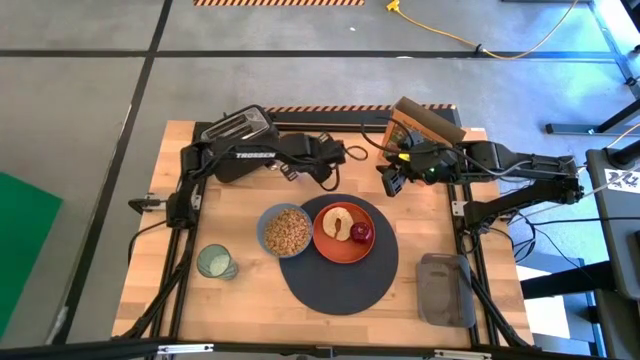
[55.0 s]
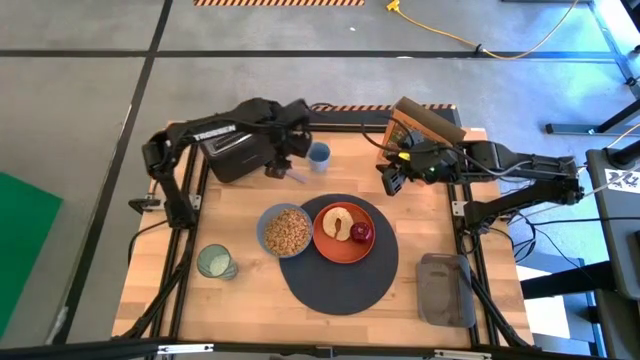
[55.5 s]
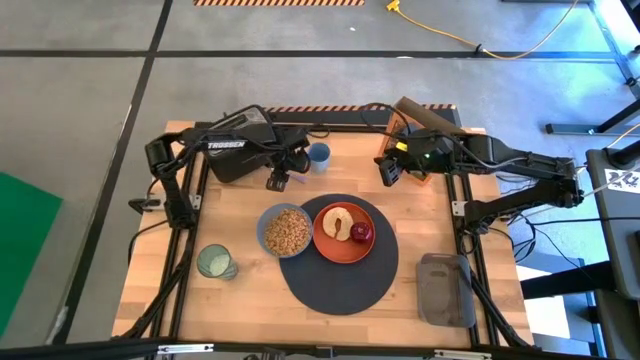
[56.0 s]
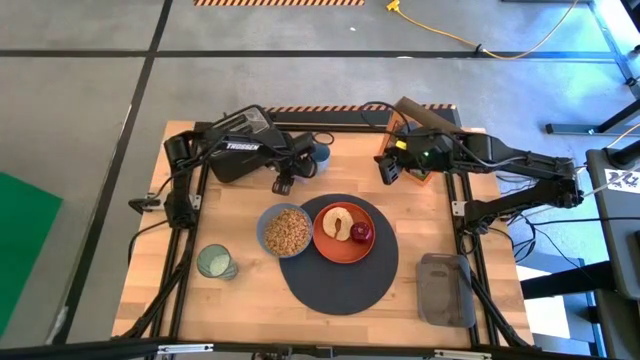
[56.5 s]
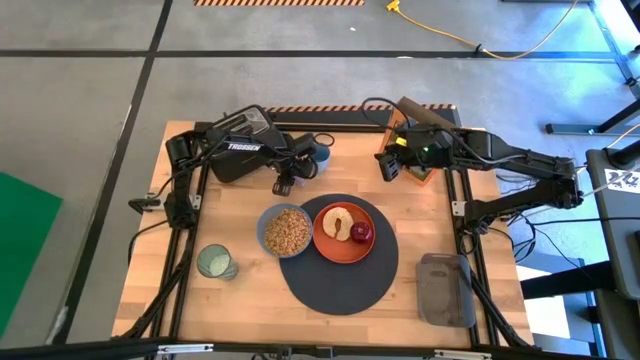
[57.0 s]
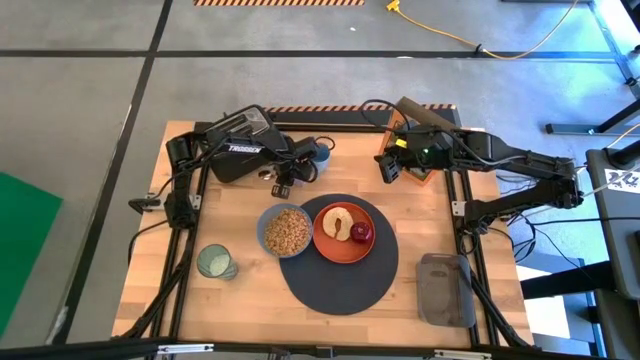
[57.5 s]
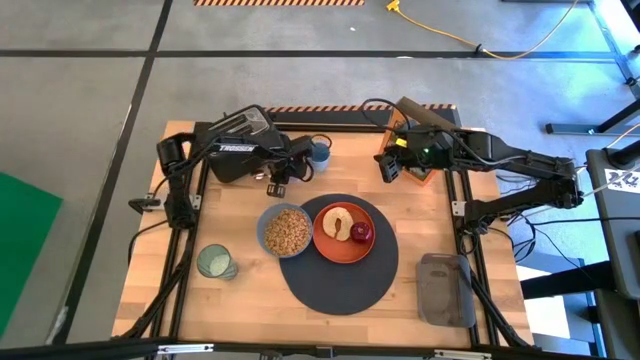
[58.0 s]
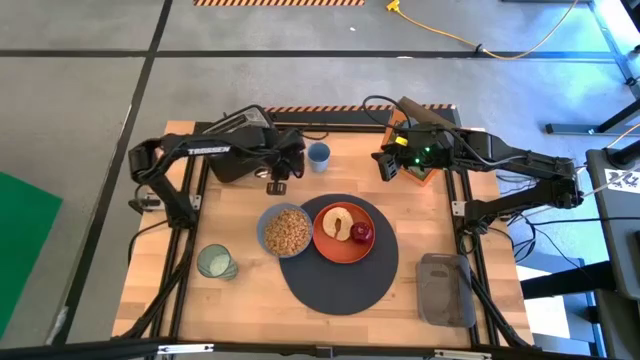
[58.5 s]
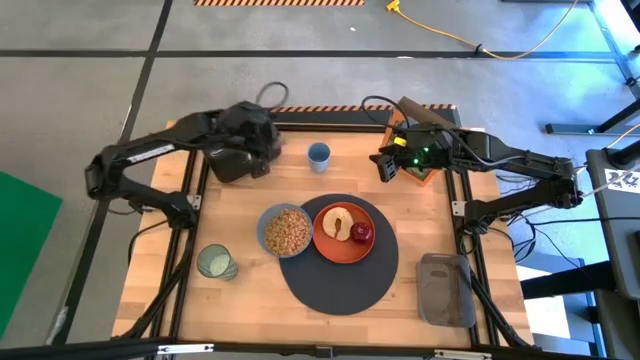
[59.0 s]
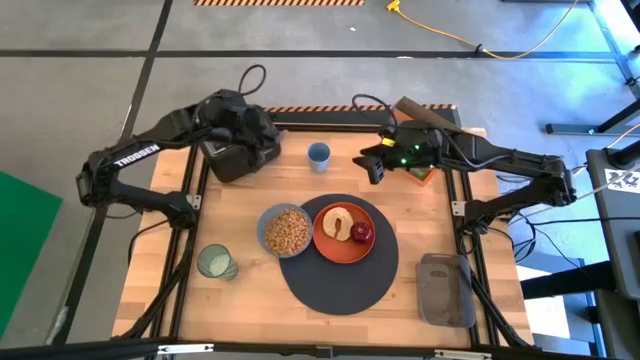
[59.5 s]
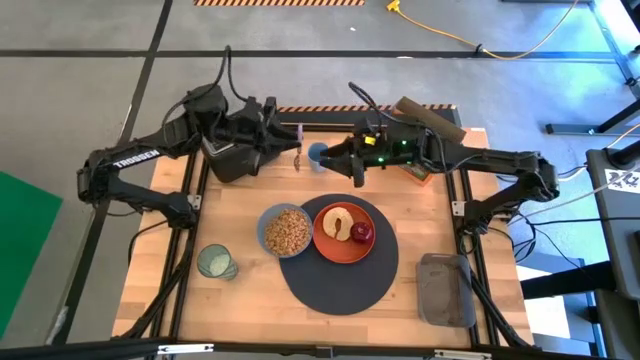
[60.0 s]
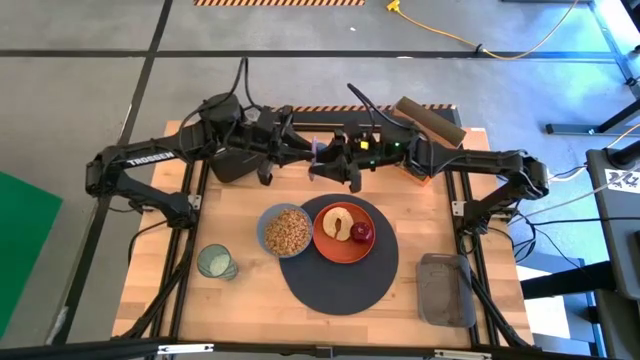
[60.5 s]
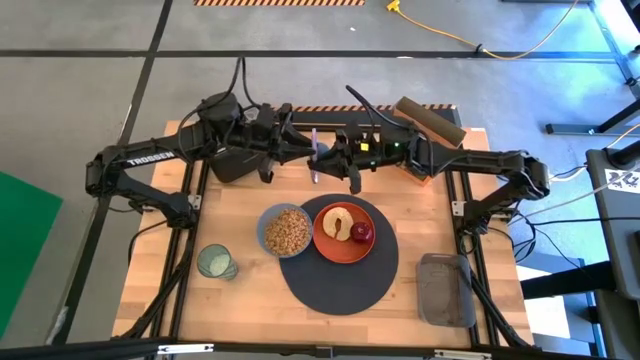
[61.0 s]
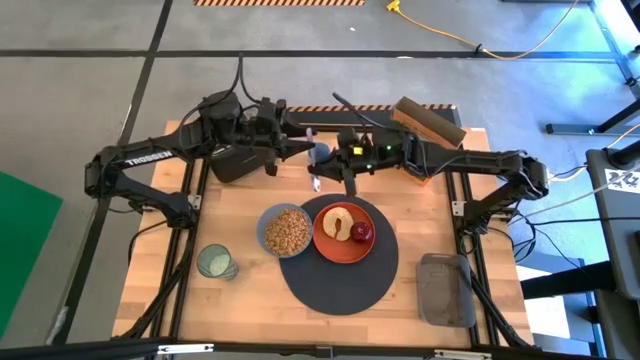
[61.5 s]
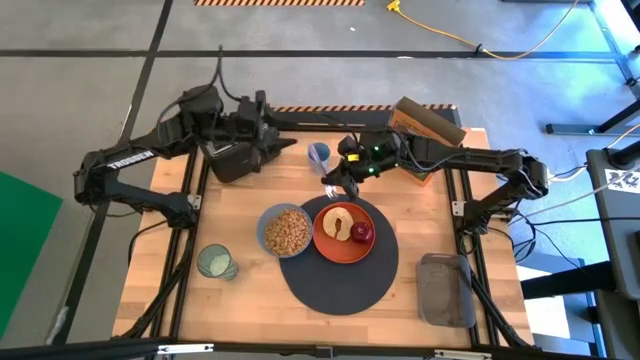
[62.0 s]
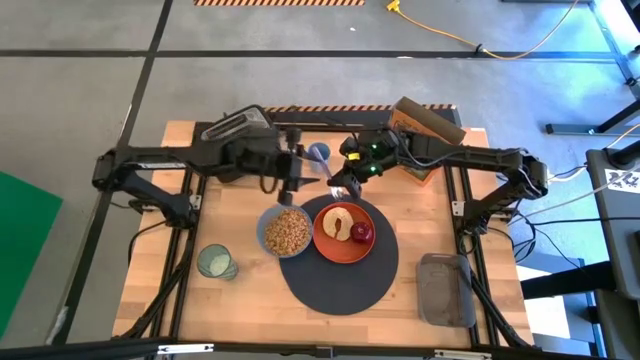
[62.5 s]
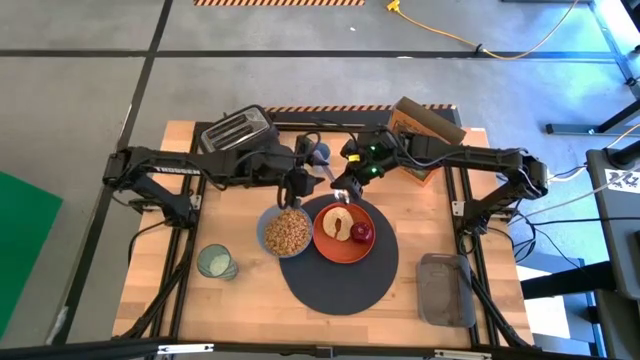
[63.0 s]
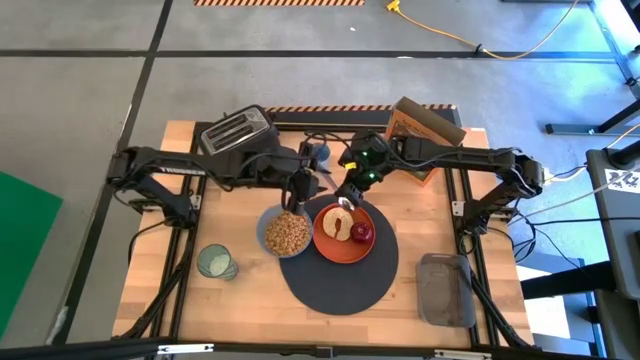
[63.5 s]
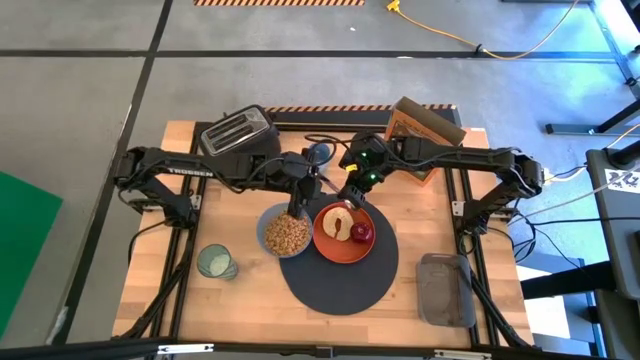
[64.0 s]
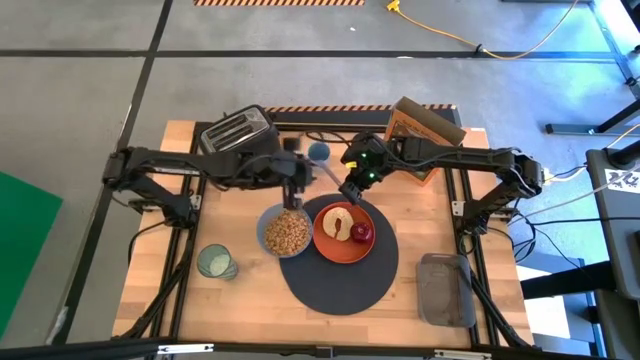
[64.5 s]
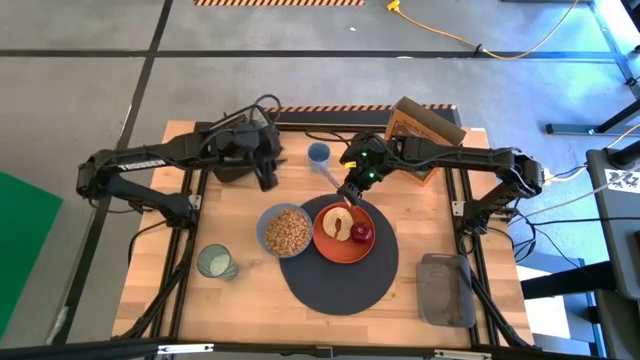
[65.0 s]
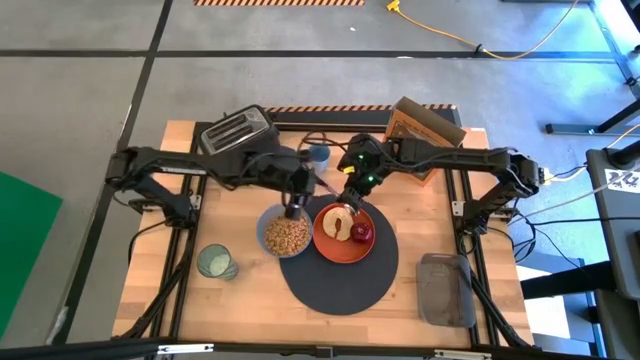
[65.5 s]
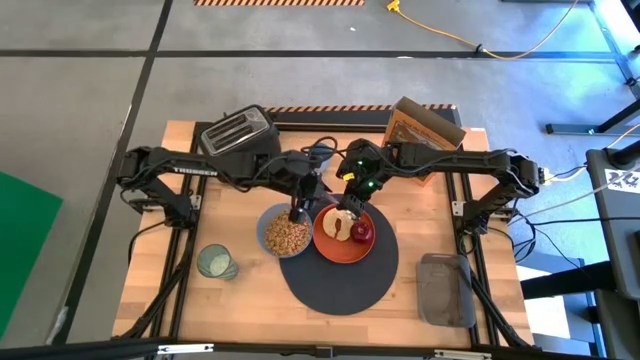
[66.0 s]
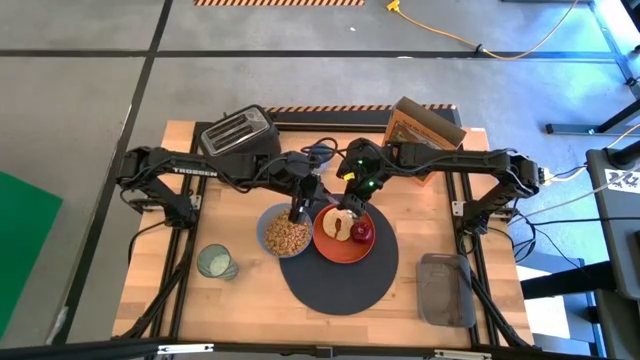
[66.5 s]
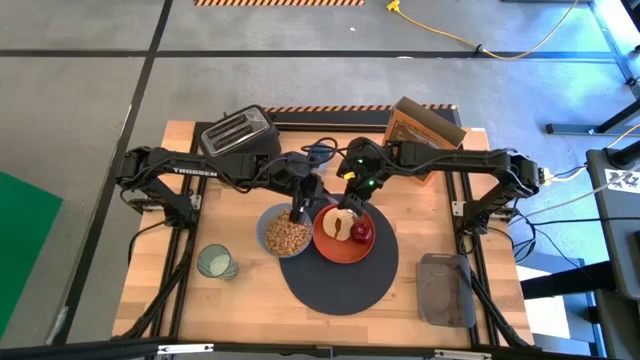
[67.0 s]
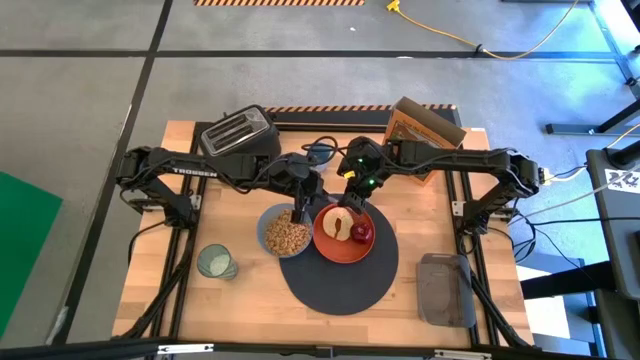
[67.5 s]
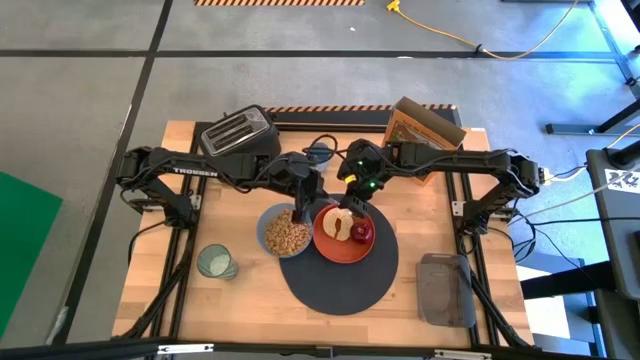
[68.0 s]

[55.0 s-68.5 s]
Task: Arrange a breakfast setting
Put the blue spoon on the tablemat to the right of the orange plate

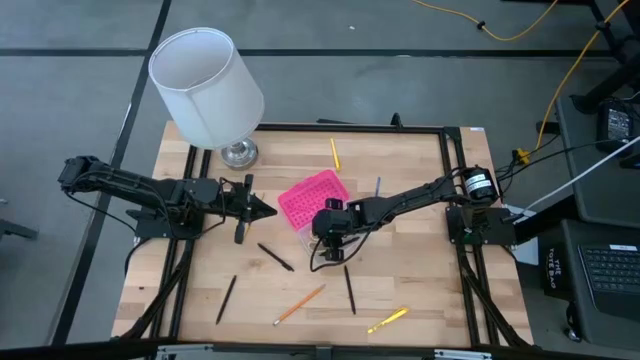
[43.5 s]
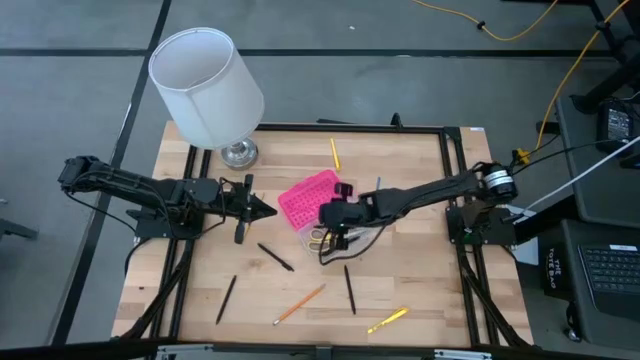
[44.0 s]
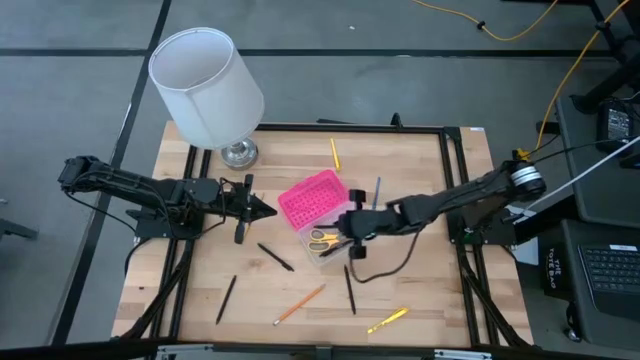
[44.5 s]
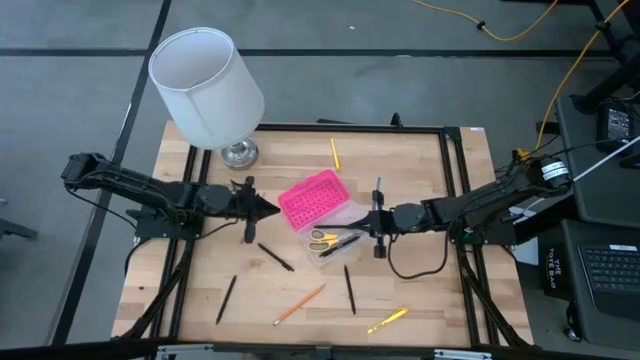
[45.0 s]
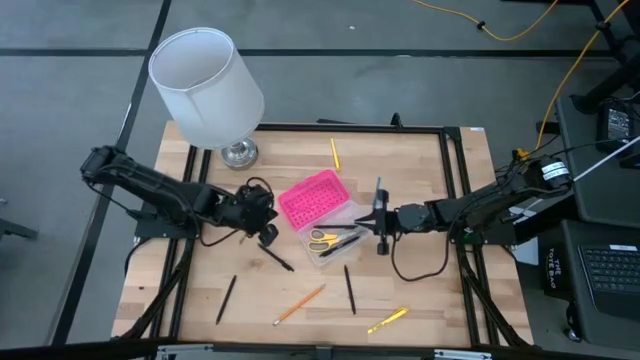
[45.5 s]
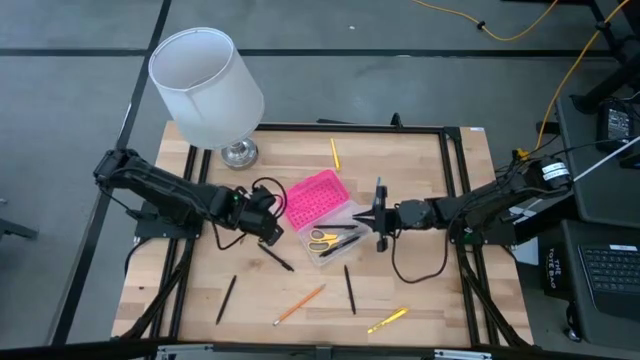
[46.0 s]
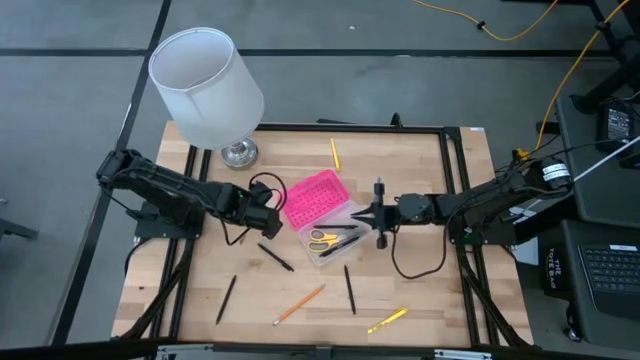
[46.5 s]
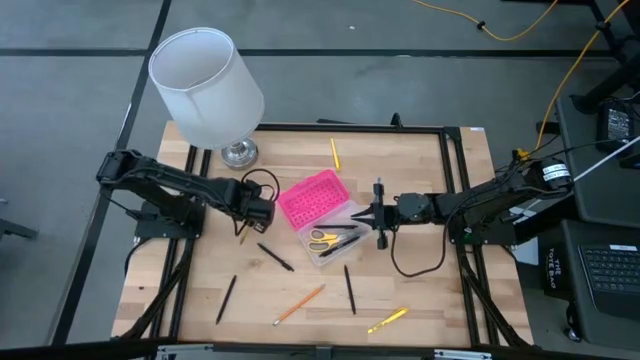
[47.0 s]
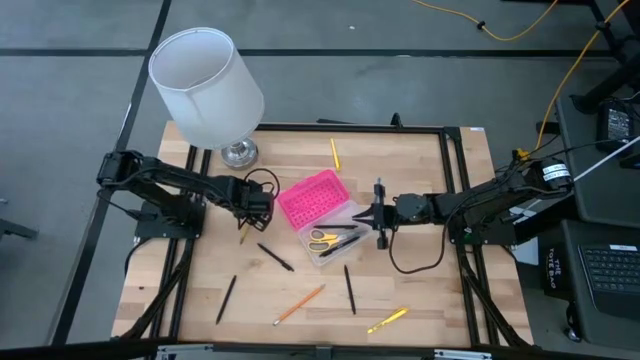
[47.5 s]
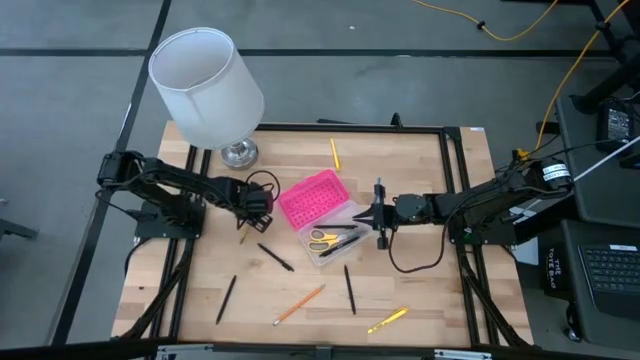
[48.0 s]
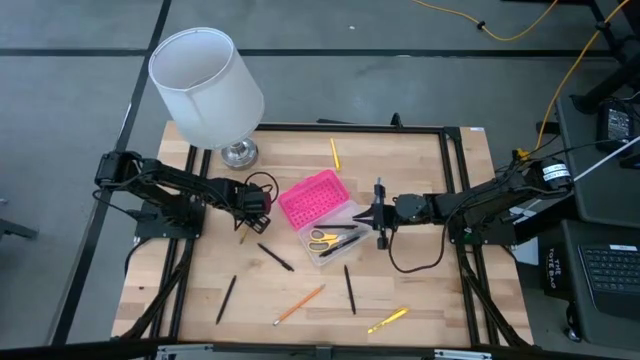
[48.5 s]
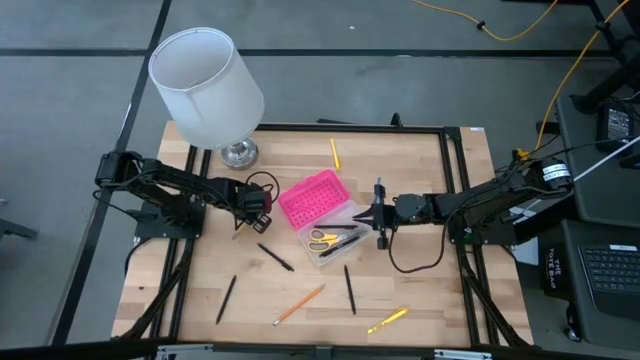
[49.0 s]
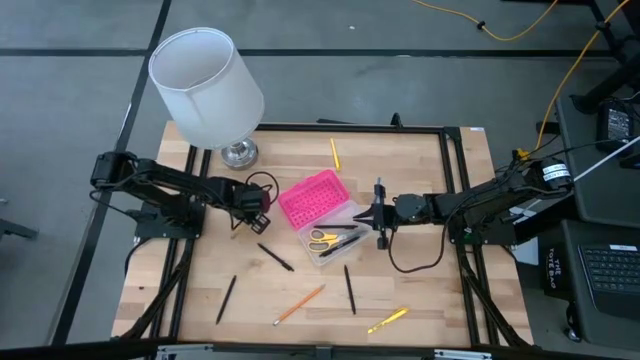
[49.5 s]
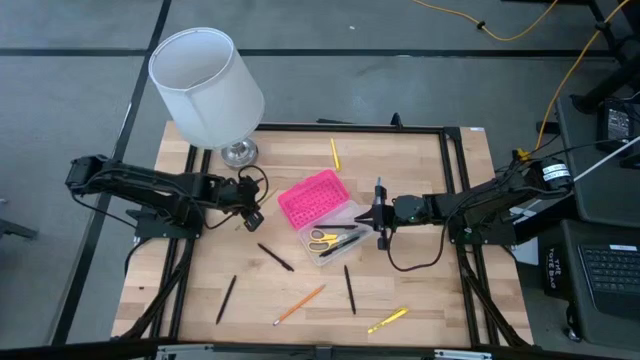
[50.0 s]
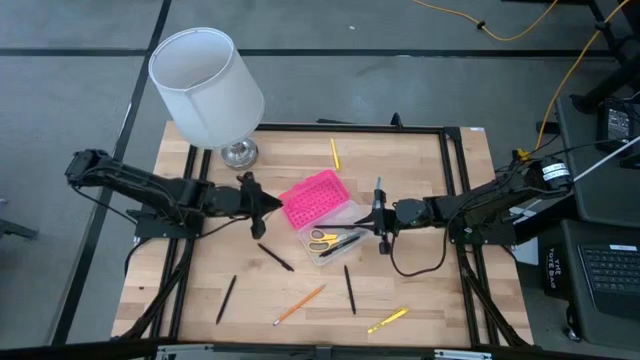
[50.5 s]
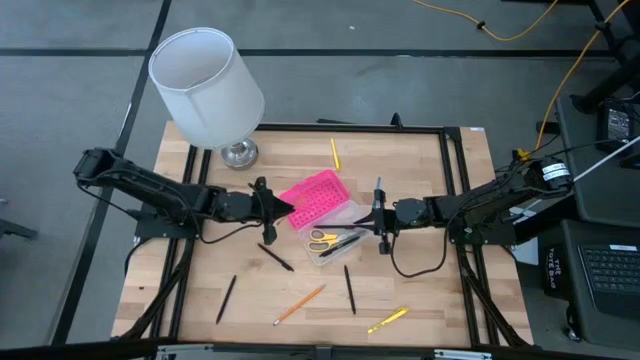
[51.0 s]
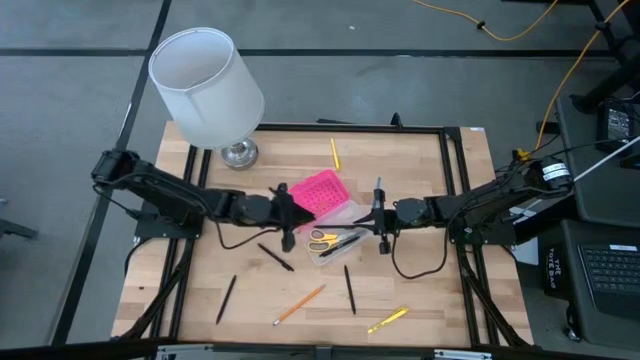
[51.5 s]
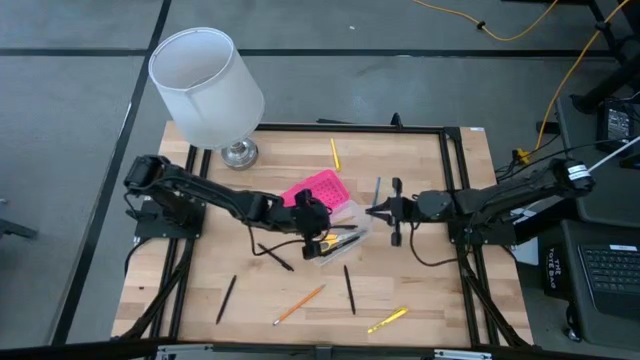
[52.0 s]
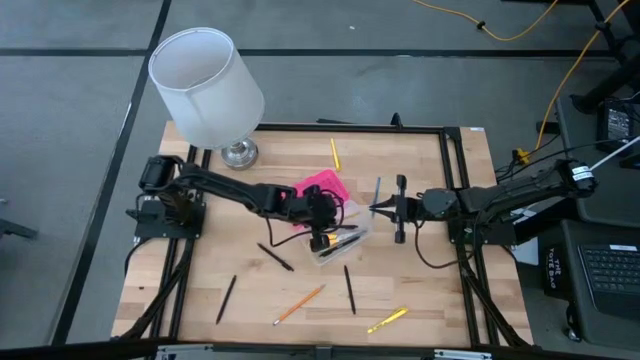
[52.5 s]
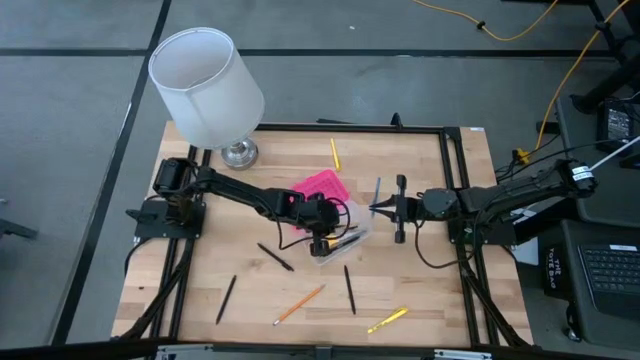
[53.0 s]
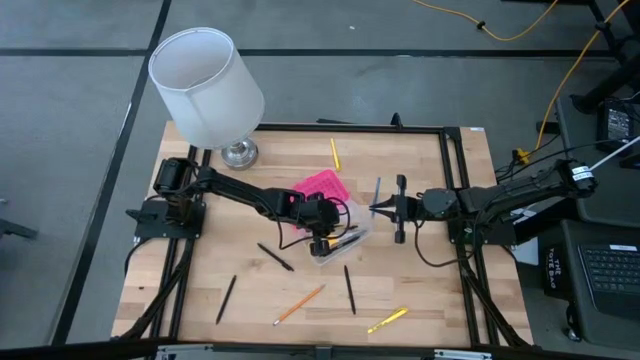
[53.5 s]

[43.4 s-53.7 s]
Task: Pick & place school supplies into a supply box
Put the yellow pencil into the supply box
